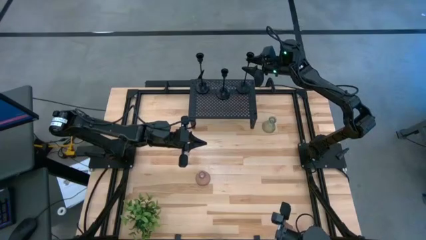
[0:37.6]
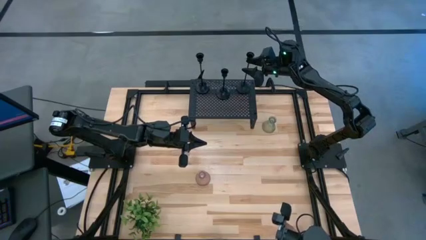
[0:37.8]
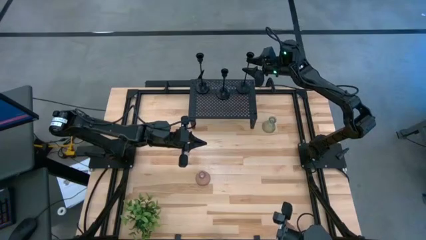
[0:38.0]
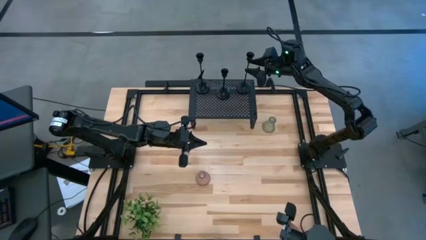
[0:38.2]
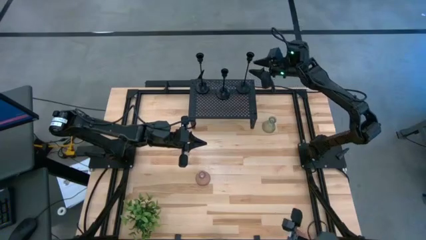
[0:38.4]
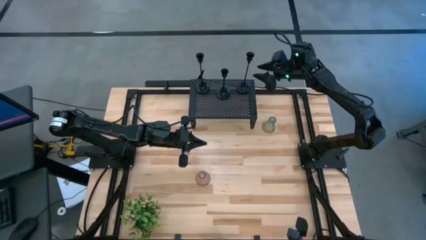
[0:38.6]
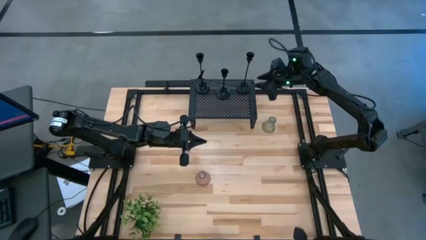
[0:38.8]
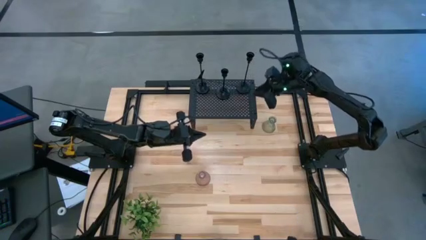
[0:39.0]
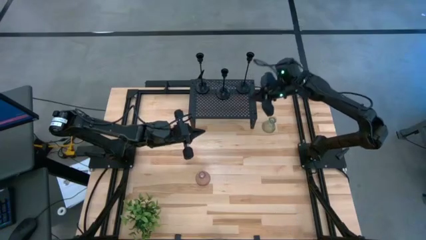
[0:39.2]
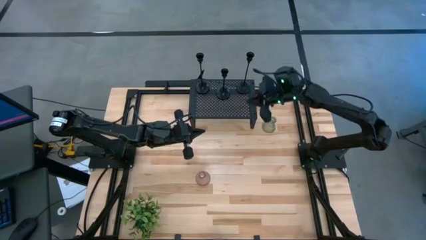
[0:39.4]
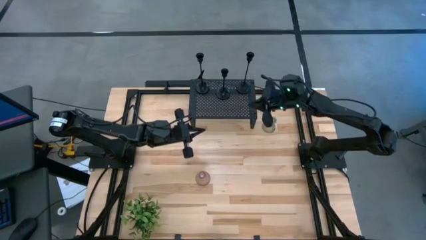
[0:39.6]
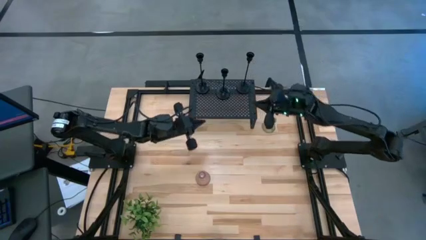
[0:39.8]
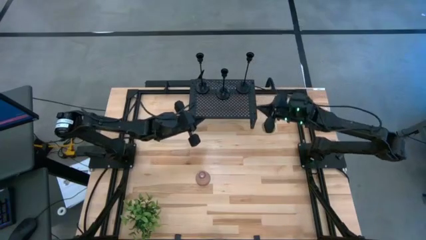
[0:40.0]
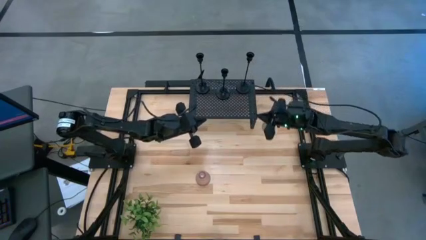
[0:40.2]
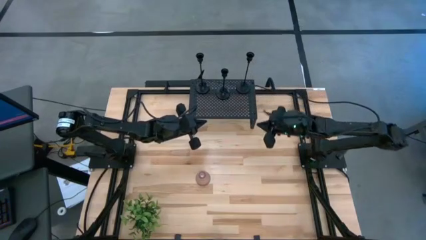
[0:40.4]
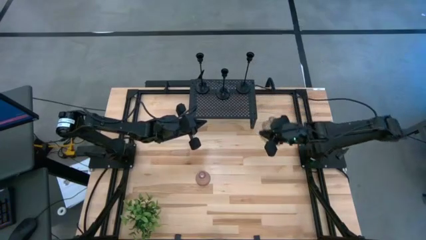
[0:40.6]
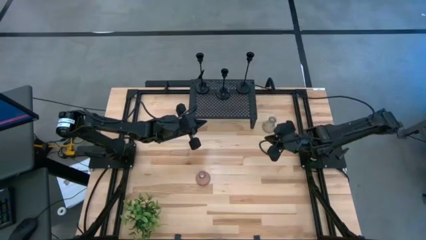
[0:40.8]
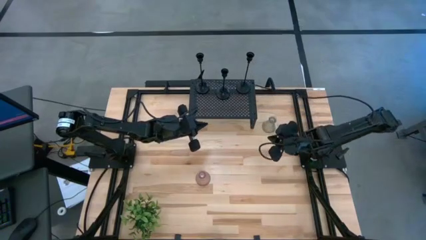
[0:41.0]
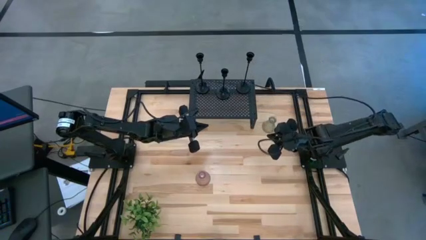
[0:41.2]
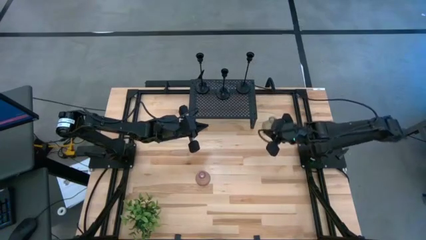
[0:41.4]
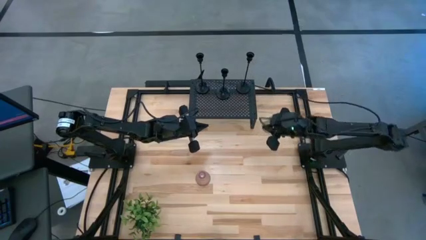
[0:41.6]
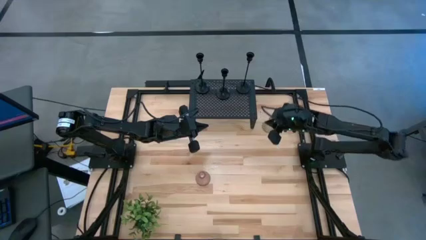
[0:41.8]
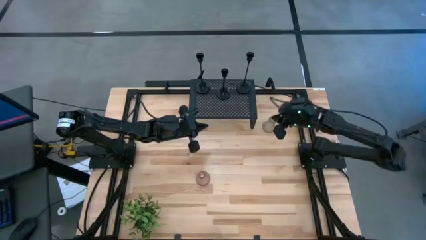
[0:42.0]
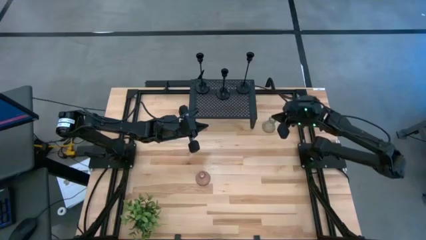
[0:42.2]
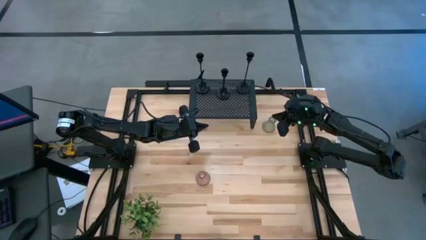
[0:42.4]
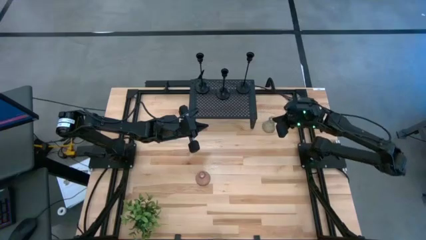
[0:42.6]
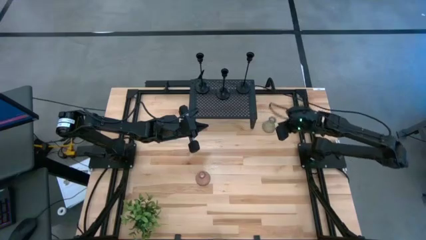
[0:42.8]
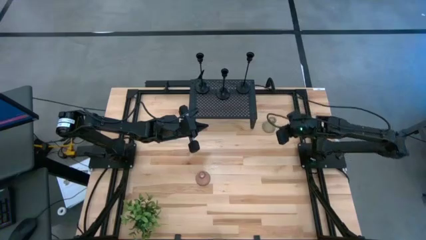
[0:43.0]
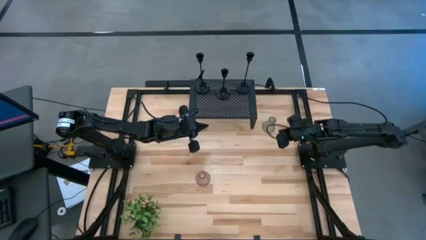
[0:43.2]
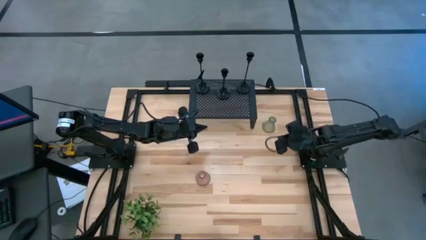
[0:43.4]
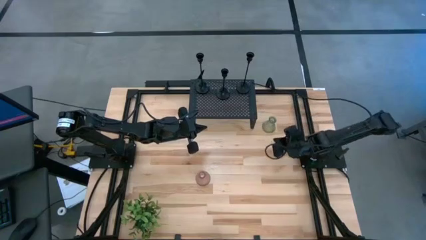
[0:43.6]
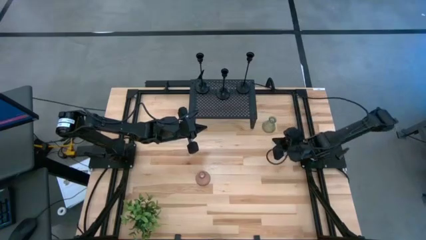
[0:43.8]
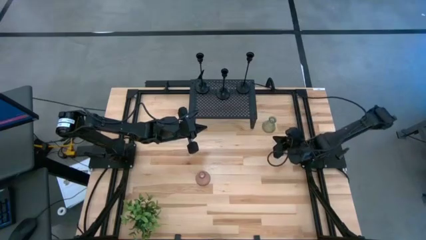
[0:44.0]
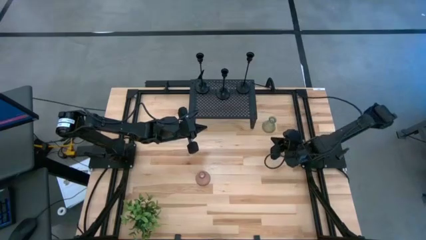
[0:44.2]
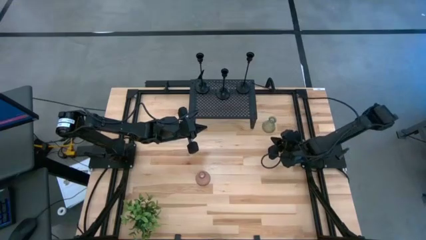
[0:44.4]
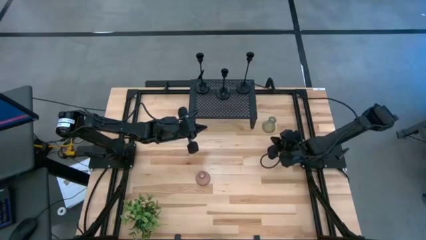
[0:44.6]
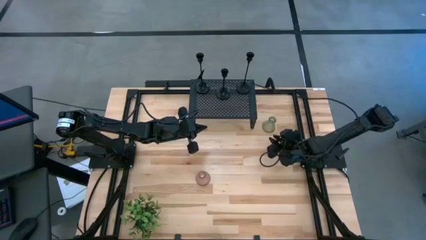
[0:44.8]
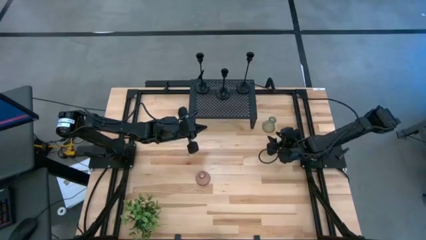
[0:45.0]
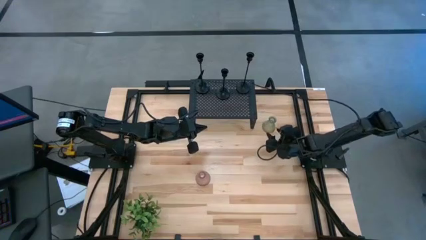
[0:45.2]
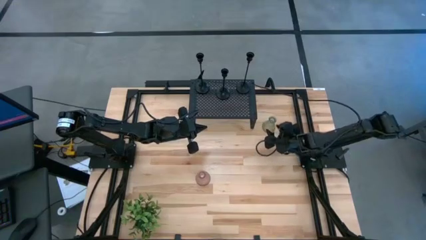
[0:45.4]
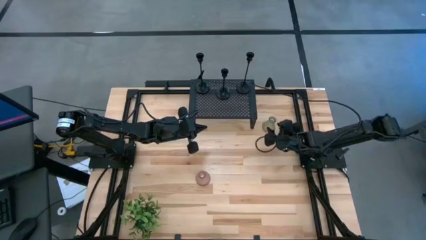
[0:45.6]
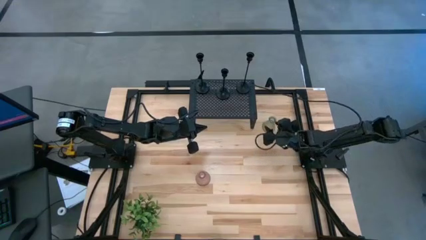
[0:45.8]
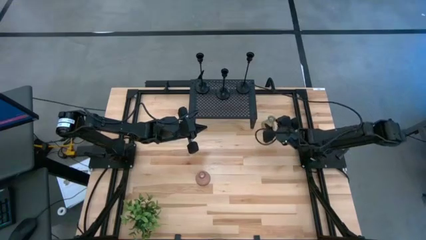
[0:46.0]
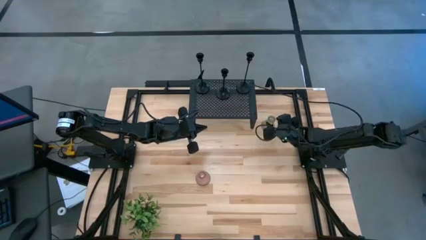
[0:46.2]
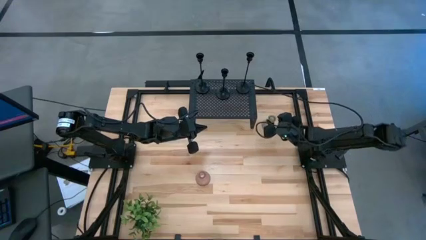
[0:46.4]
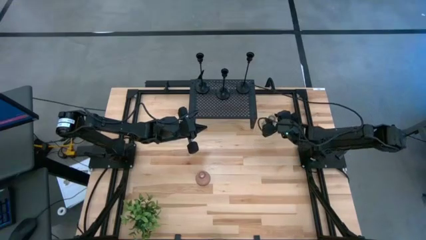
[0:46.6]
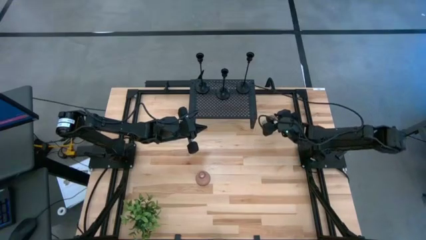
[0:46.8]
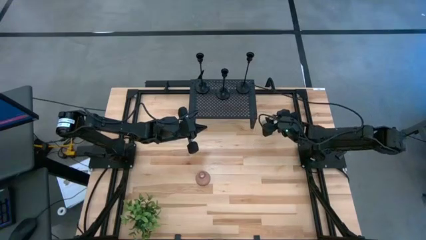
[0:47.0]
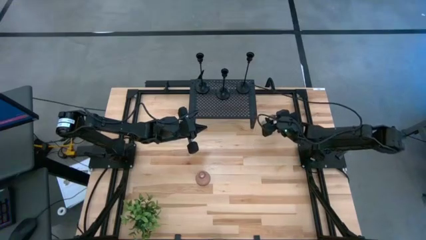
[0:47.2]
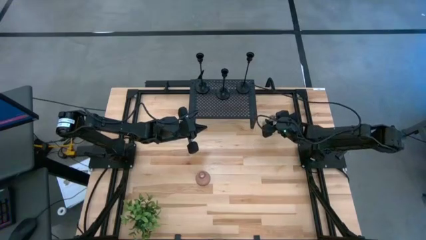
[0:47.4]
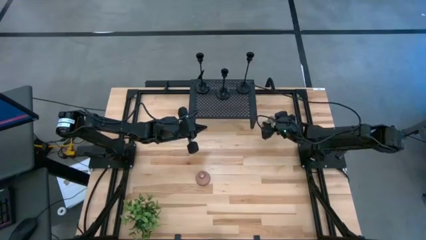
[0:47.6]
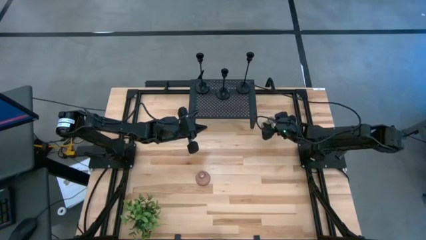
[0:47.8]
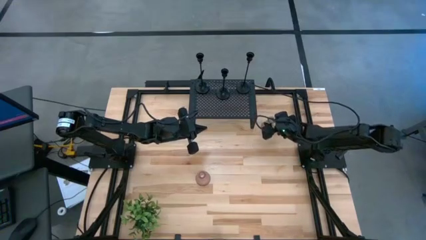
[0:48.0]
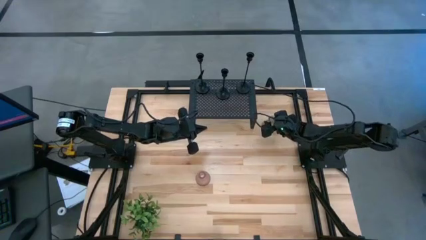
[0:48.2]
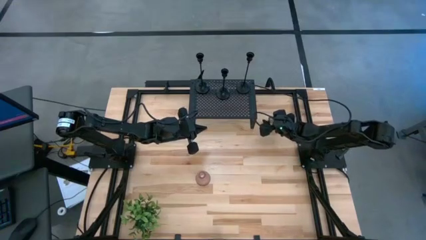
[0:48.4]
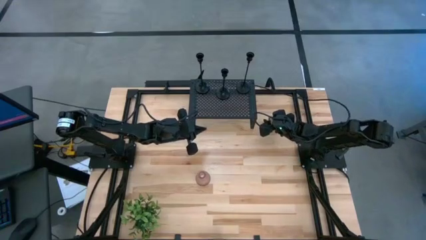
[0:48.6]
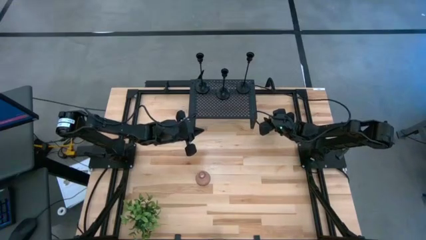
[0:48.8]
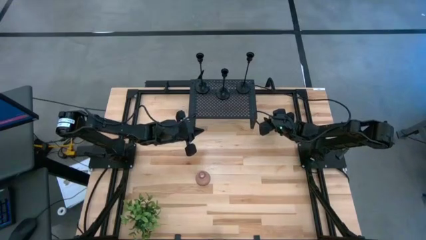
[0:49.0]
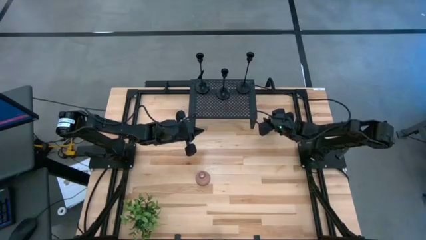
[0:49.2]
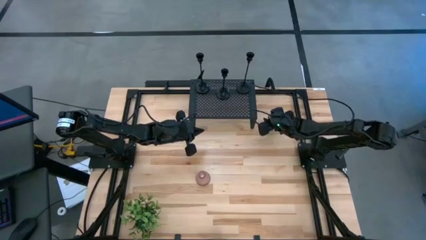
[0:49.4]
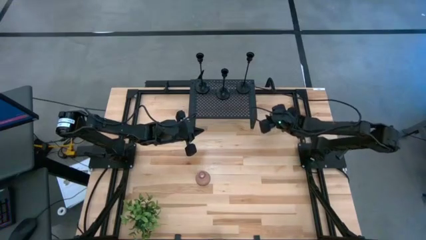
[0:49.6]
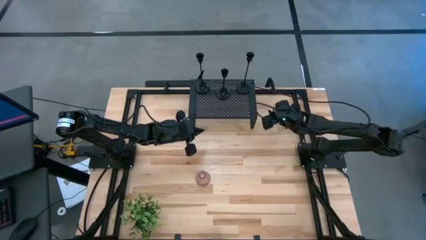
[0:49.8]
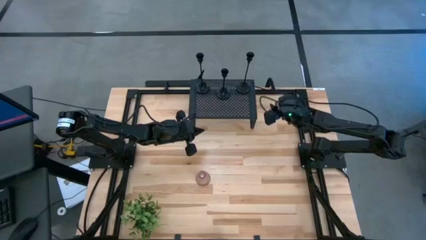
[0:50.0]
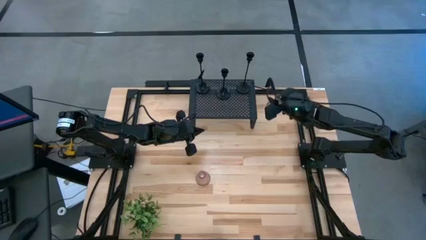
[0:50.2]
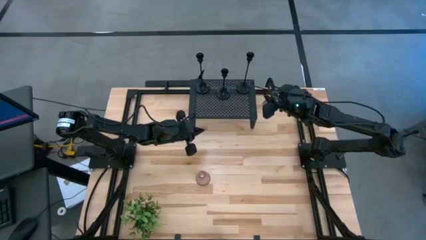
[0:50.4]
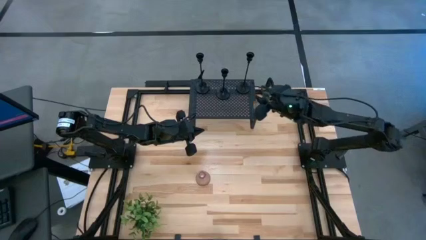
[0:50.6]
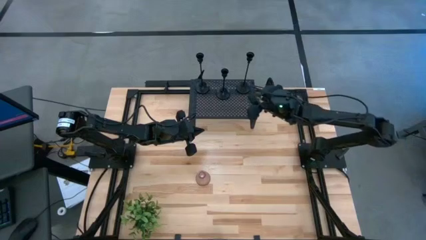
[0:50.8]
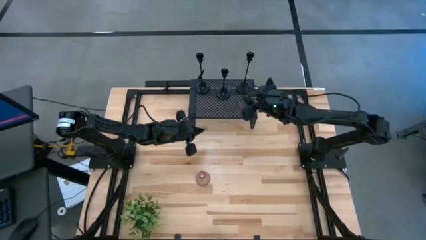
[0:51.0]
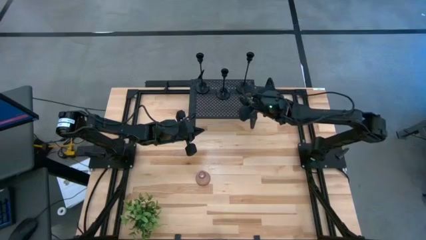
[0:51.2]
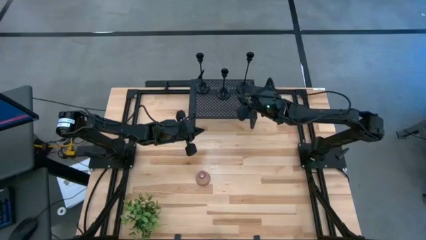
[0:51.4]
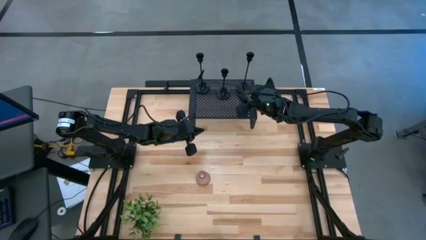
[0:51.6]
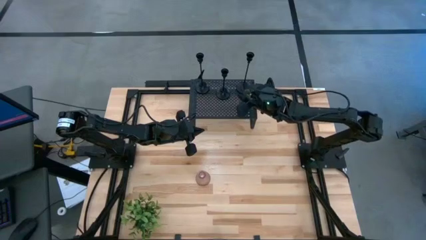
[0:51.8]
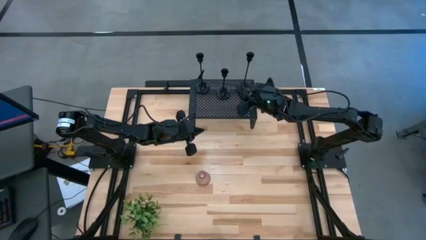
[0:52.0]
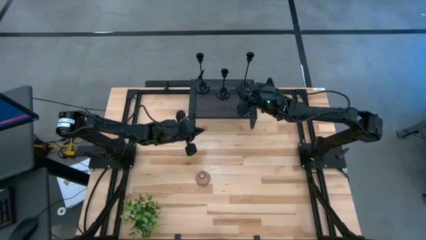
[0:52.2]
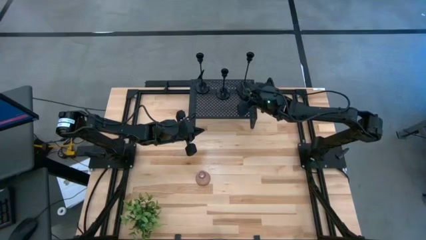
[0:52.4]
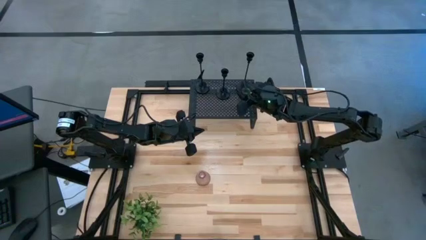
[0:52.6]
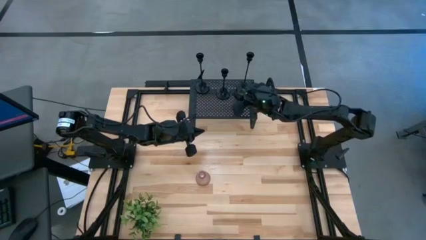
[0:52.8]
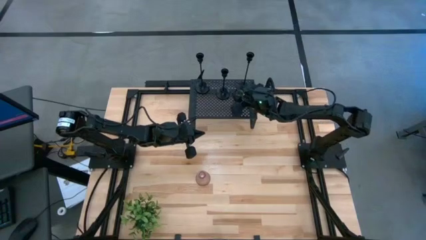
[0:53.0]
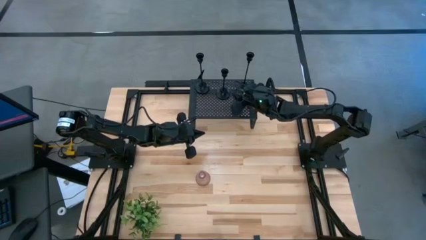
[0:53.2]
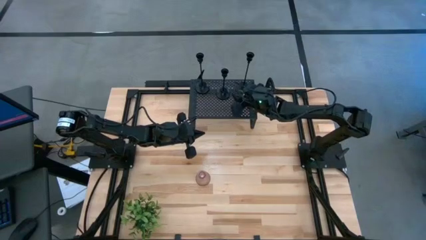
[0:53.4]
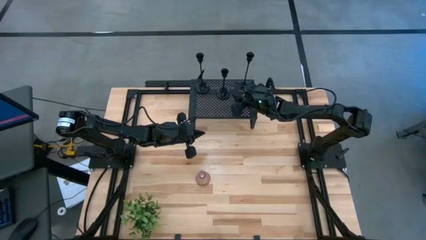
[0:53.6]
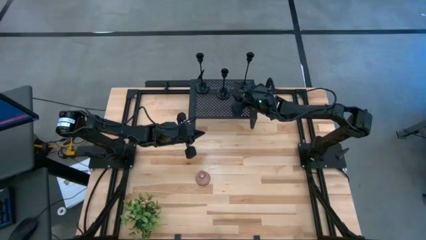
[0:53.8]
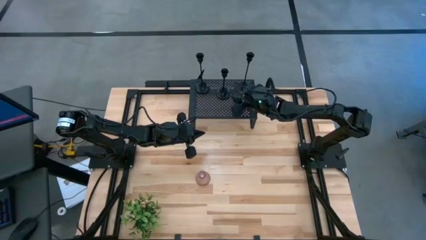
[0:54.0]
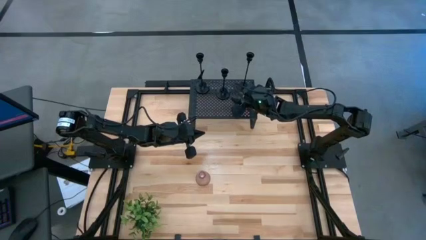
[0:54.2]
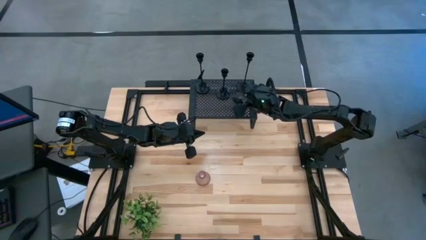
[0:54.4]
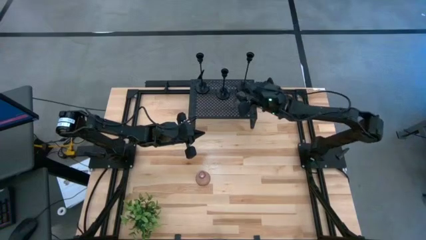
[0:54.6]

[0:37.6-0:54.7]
Task: Pick & Place candle stick holders
Put the green candle holder on the shelf
